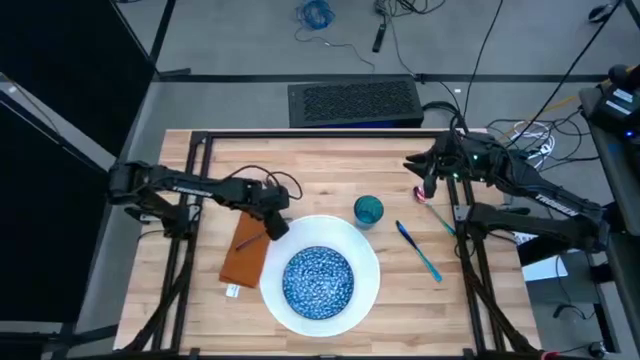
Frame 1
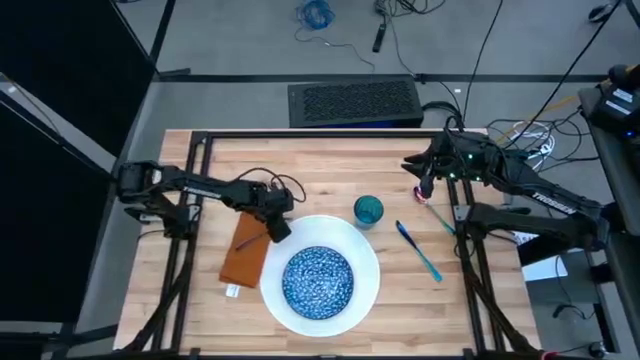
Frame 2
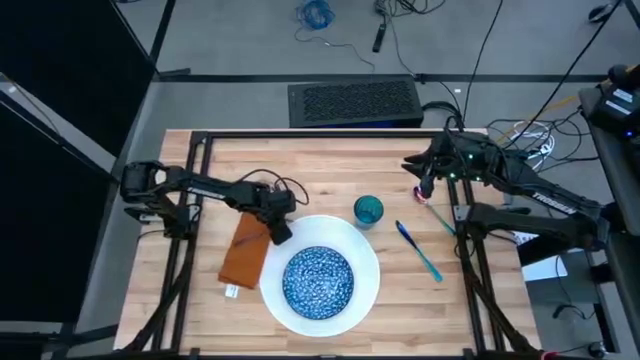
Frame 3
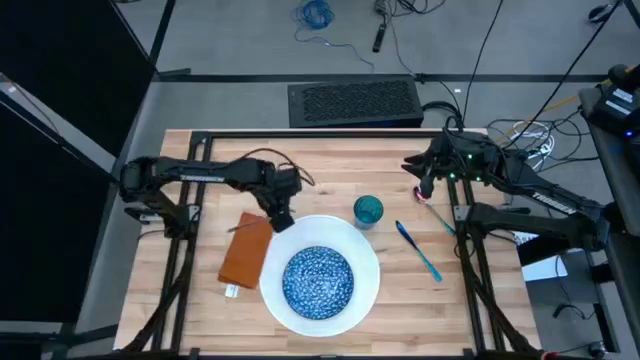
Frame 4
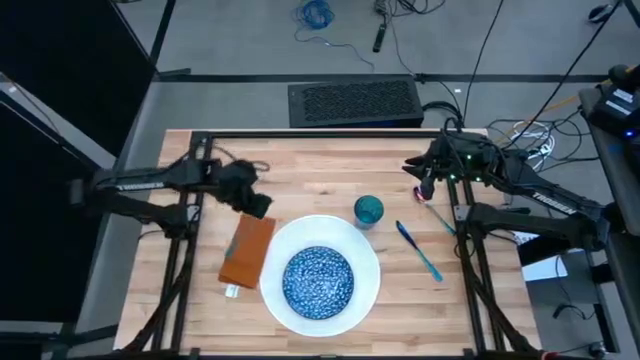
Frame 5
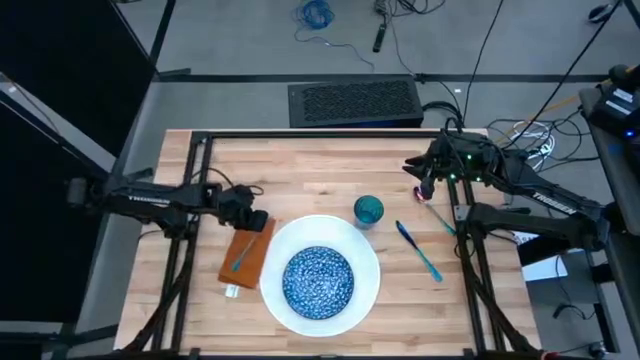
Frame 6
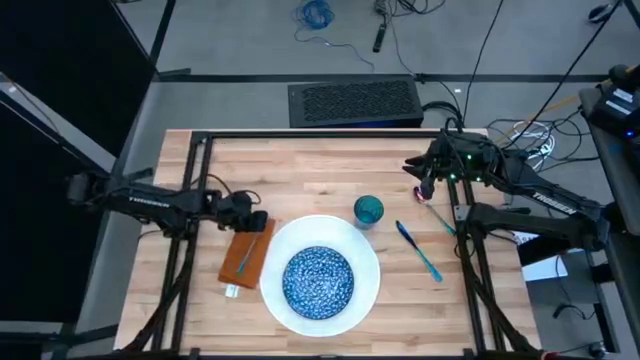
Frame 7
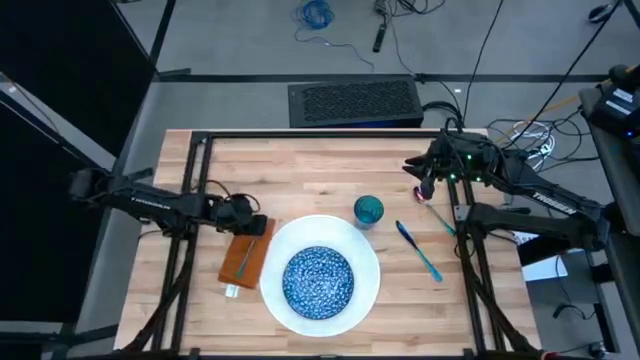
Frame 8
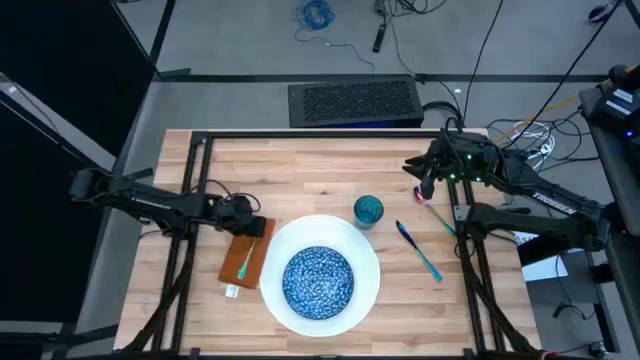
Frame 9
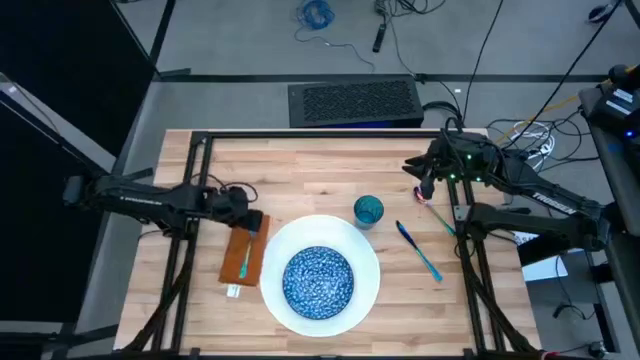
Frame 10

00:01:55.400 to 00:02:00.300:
Task: Set table place
Stack the blue fork on top of the brown table napkin

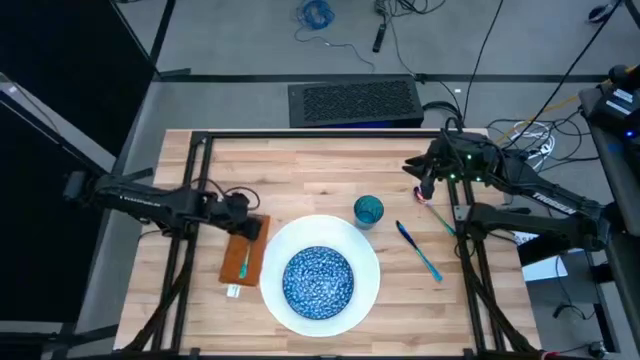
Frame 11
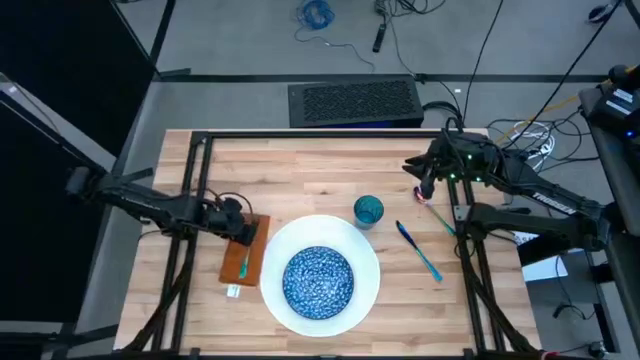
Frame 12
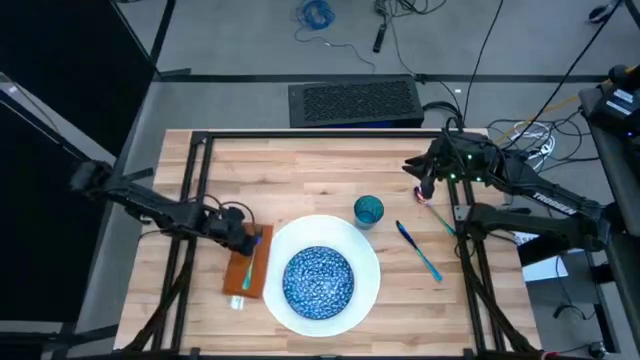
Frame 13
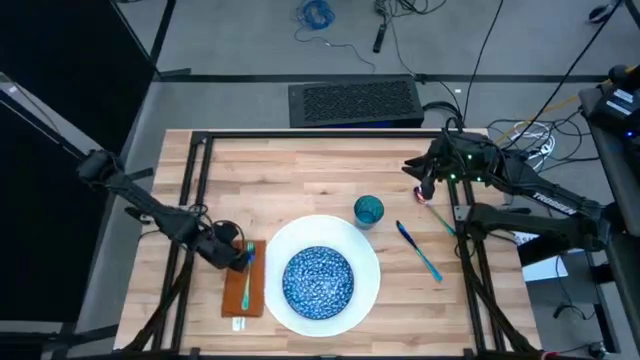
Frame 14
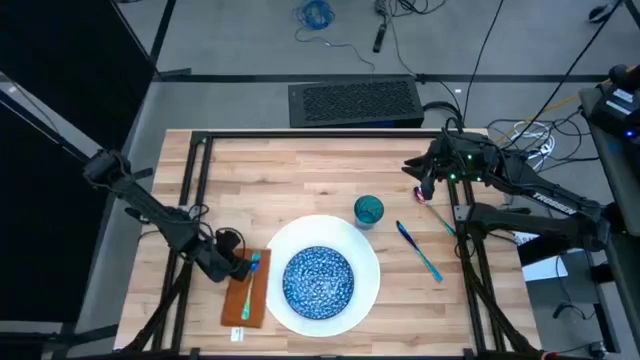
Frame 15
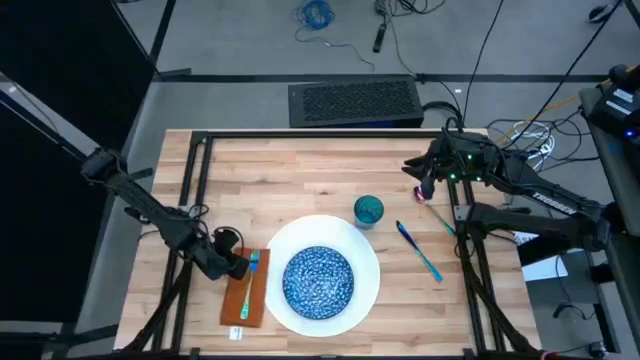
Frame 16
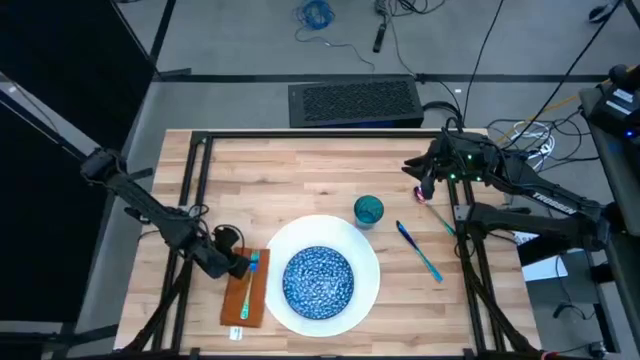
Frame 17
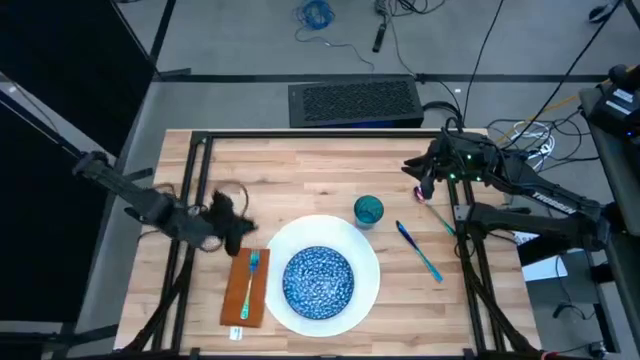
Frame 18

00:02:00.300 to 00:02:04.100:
Adjust the brown table napkin to the left of the tablemat

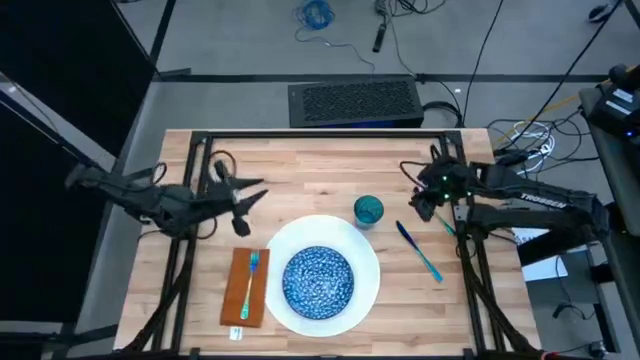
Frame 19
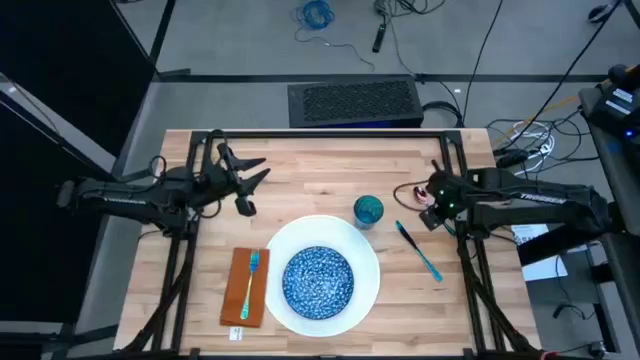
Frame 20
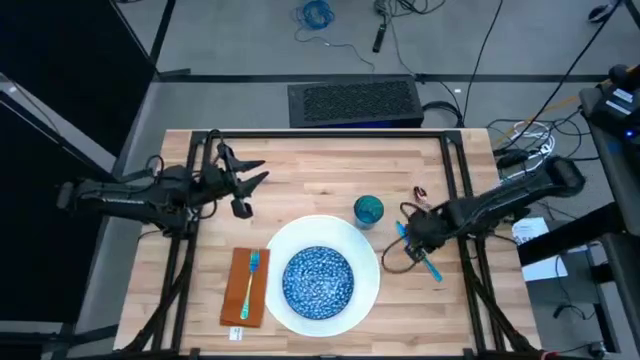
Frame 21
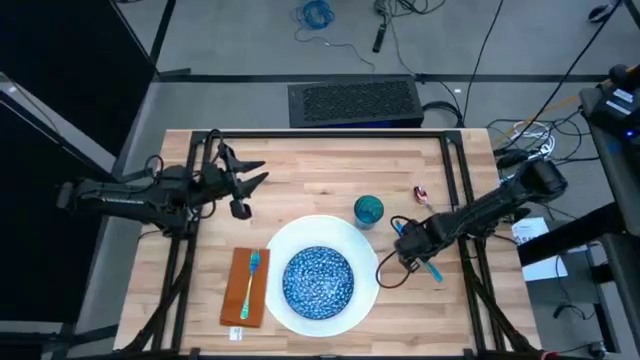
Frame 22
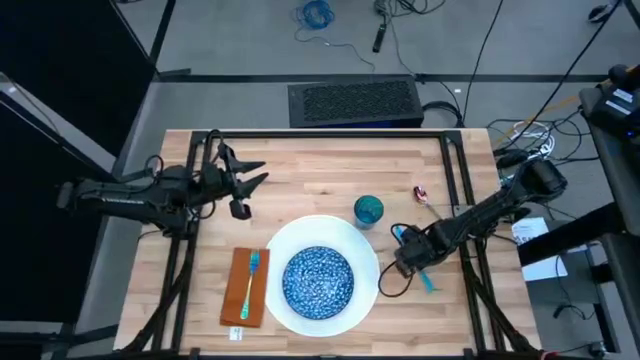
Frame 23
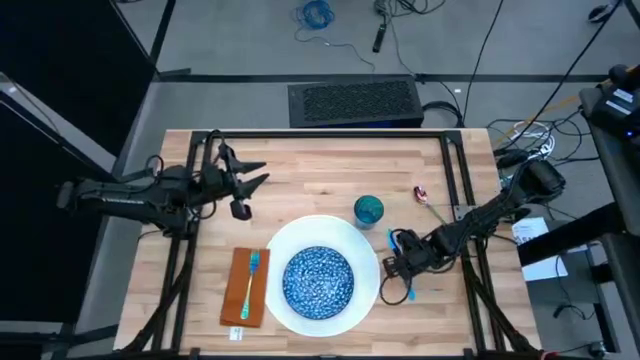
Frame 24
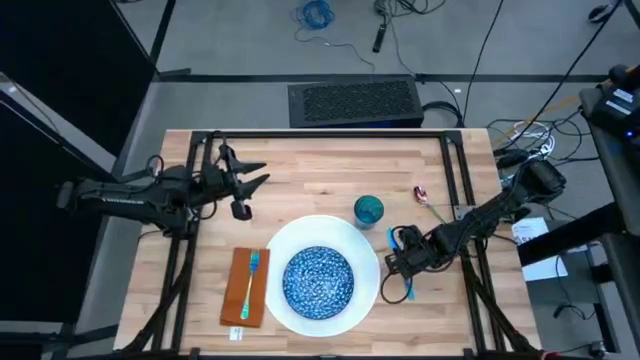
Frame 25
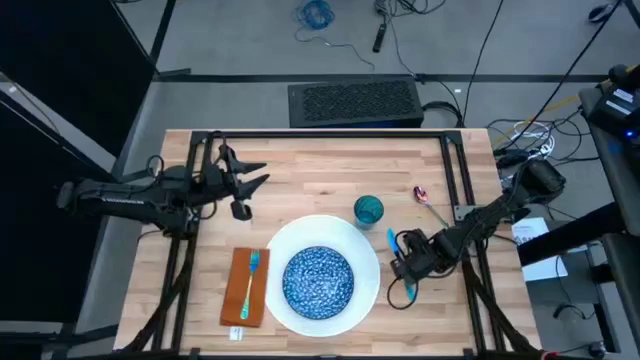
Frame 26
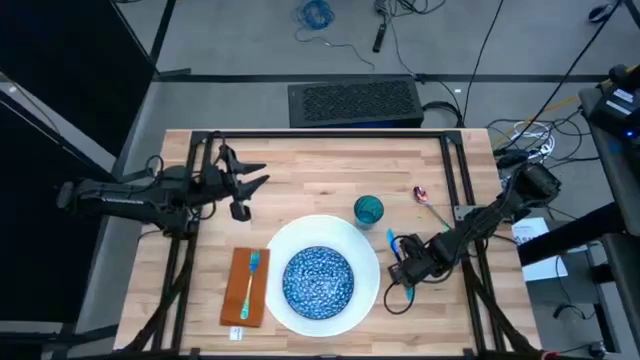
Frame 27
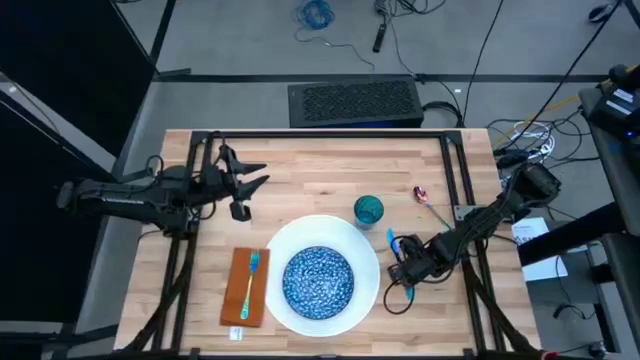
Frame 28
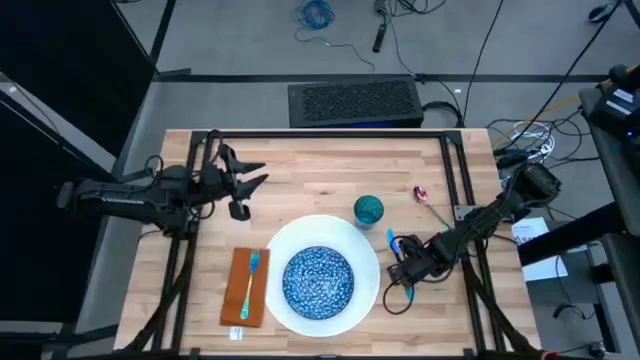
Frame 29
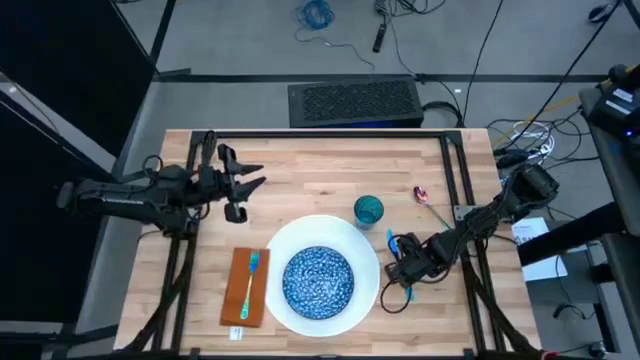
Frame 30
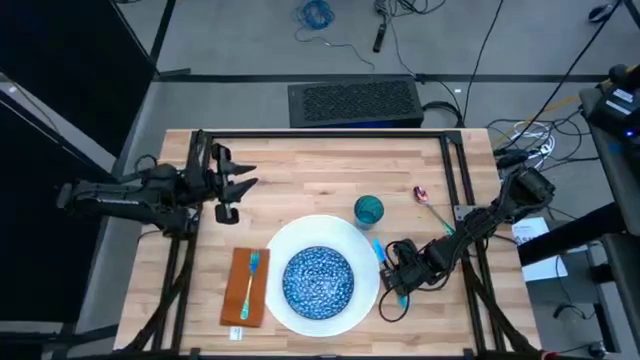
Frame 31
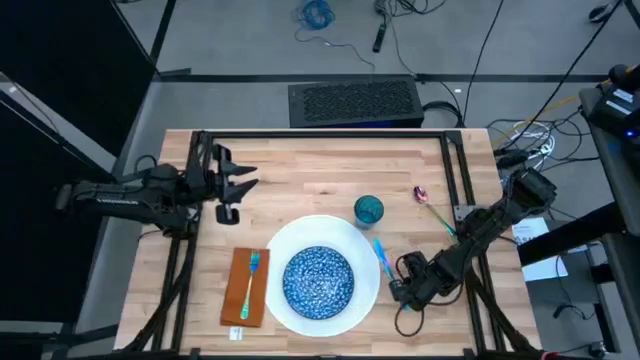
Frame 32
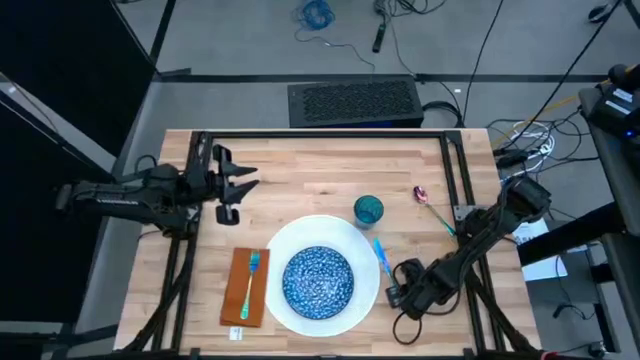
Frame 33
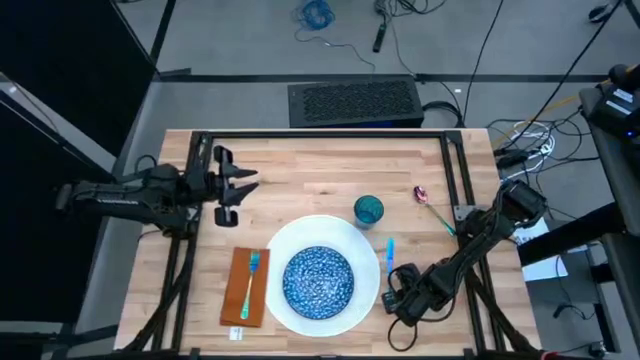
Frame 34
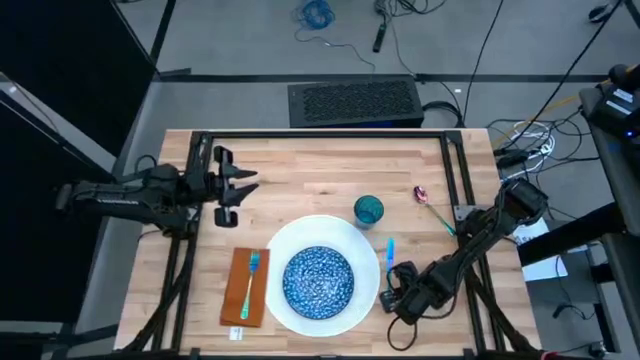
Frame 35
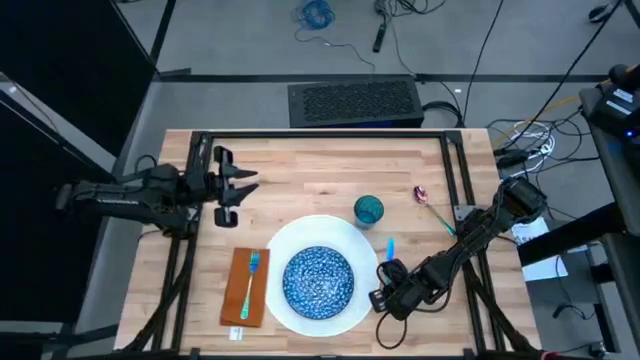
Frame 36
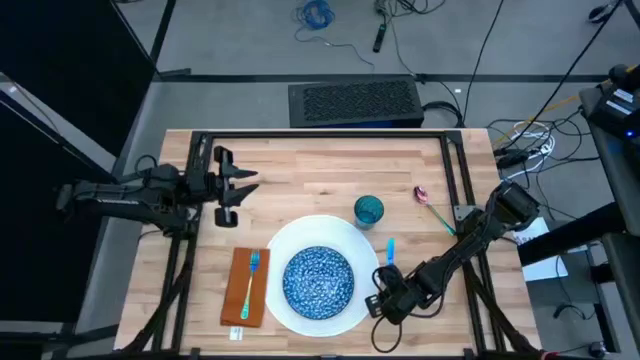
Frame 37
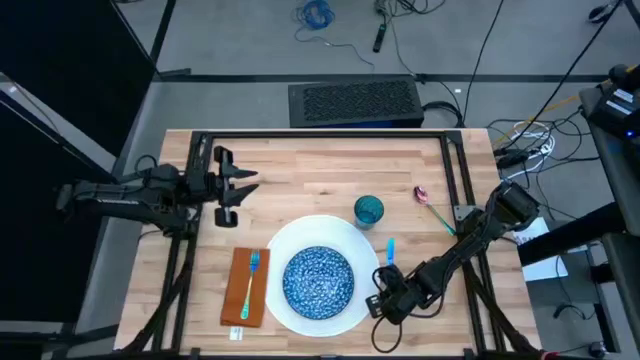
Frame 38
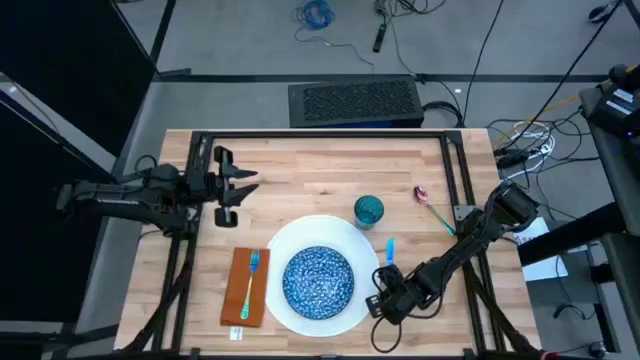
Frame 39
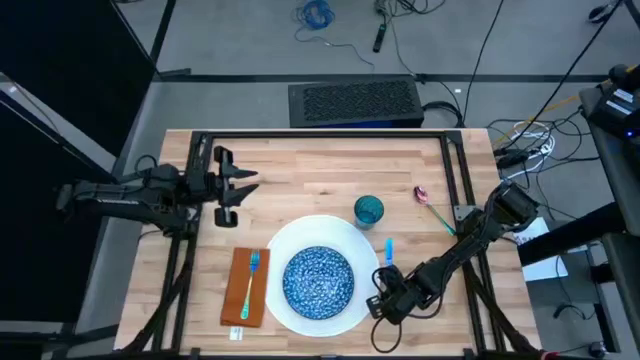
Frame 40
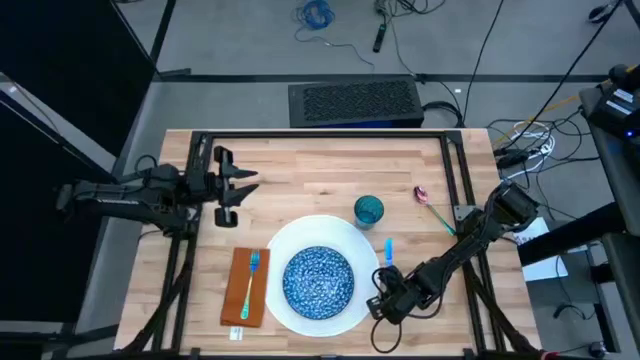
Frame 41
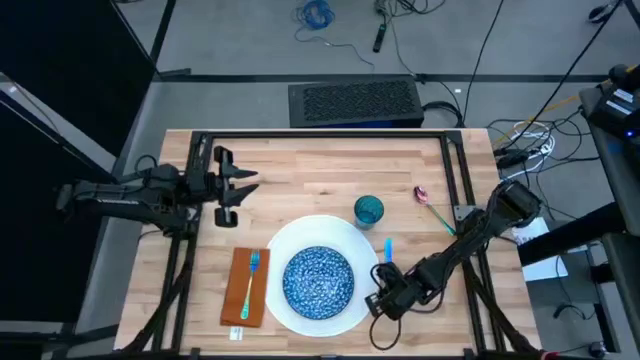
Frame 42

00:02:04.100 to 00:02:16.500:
Move the blue table knife to the right of the white tablemat
